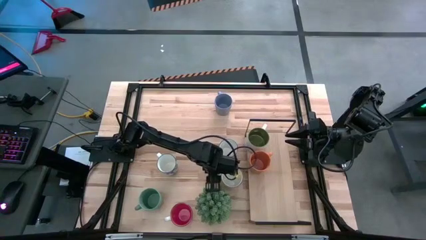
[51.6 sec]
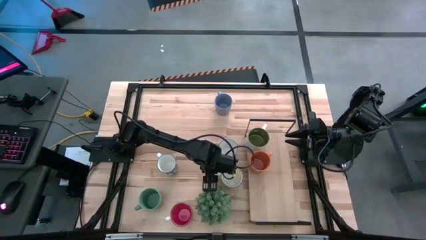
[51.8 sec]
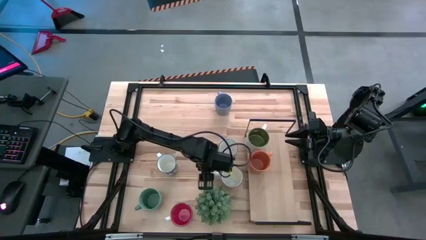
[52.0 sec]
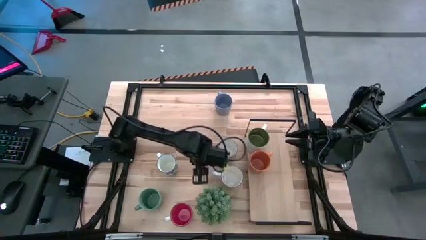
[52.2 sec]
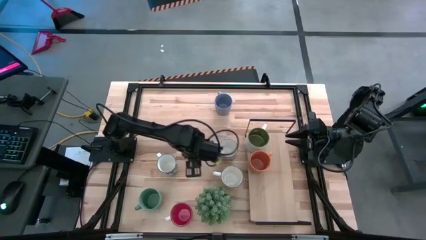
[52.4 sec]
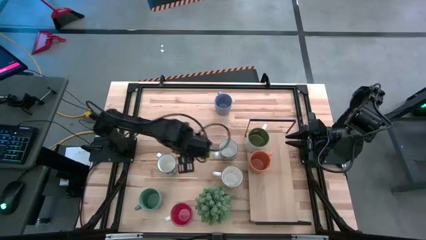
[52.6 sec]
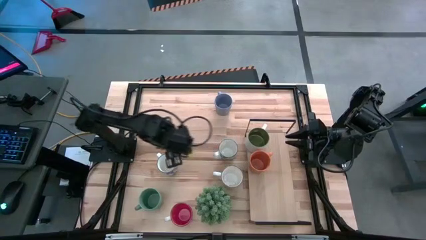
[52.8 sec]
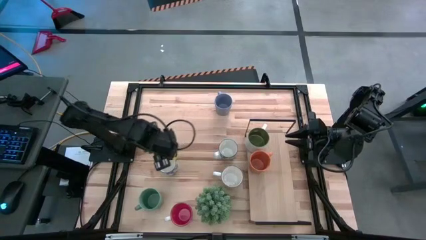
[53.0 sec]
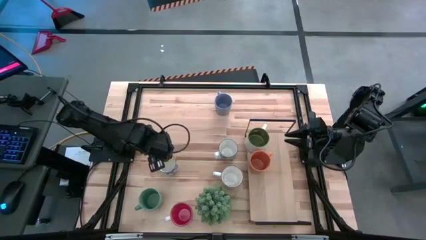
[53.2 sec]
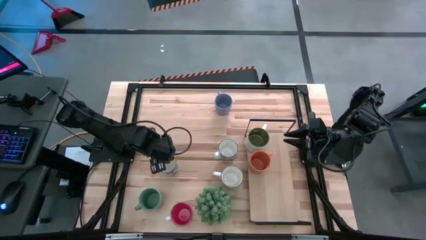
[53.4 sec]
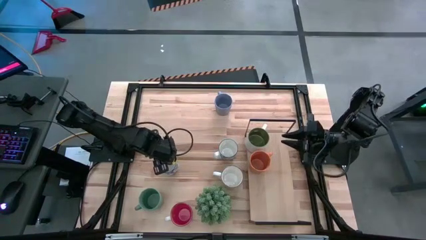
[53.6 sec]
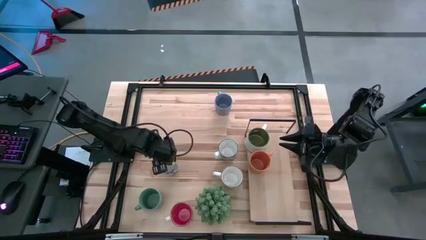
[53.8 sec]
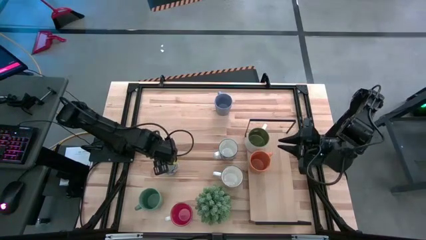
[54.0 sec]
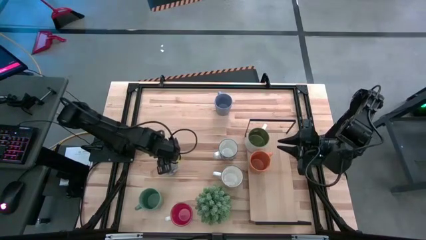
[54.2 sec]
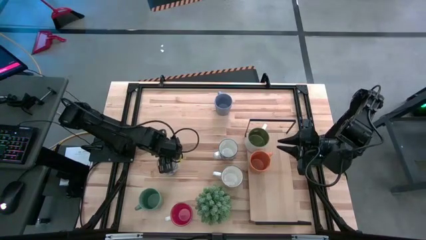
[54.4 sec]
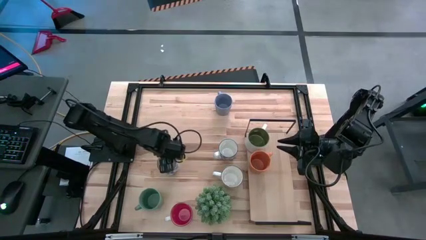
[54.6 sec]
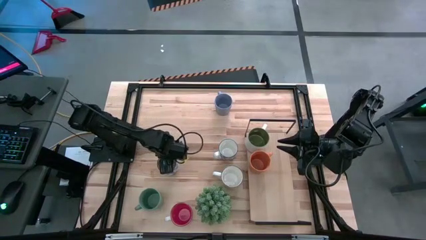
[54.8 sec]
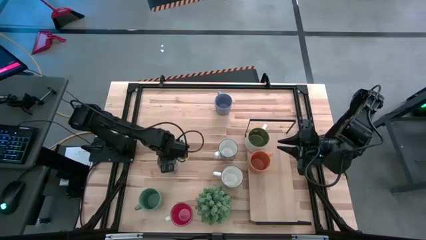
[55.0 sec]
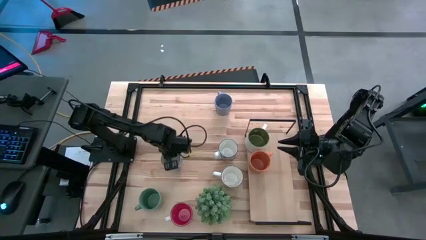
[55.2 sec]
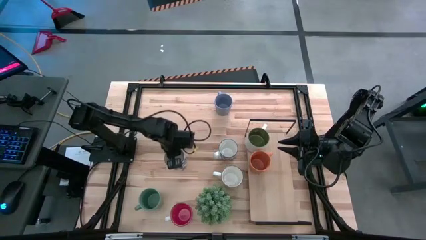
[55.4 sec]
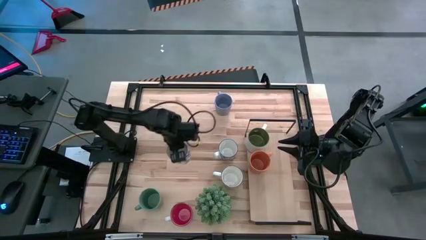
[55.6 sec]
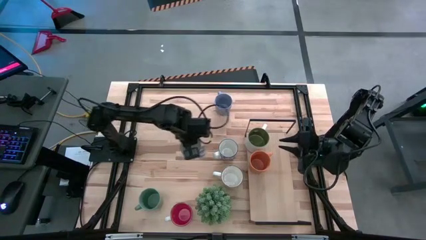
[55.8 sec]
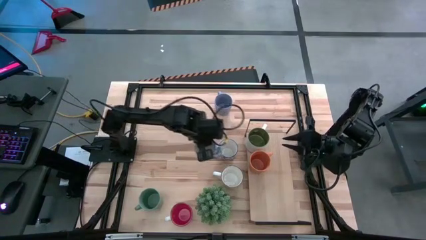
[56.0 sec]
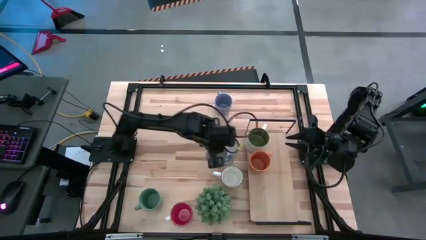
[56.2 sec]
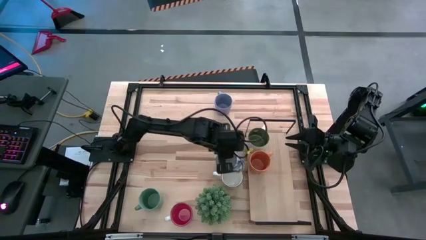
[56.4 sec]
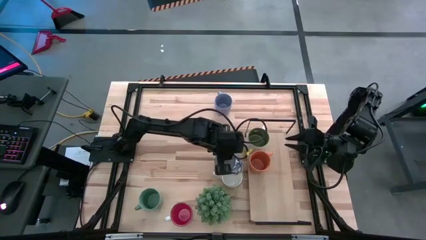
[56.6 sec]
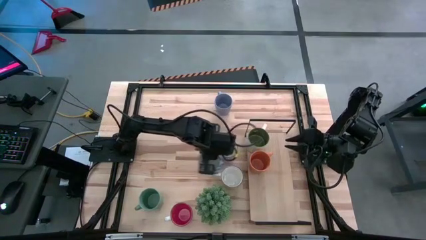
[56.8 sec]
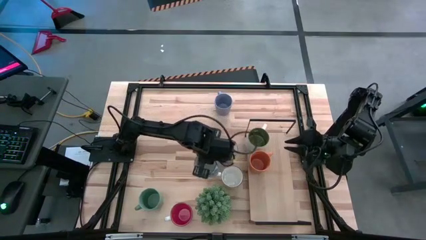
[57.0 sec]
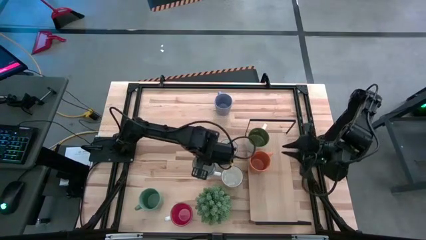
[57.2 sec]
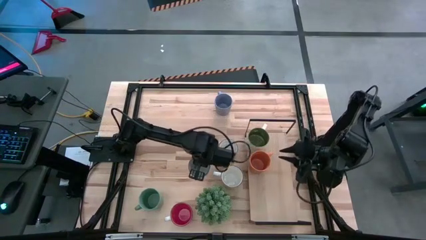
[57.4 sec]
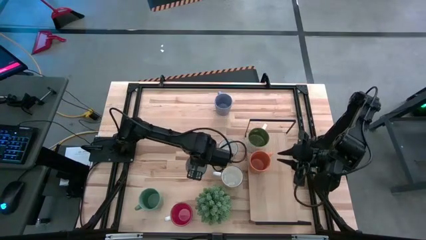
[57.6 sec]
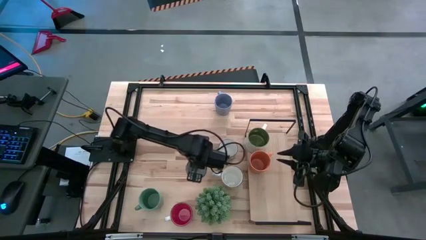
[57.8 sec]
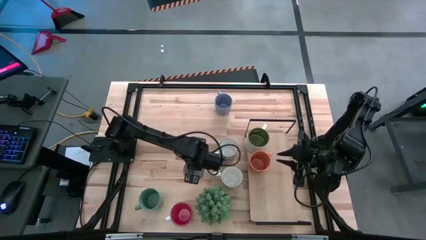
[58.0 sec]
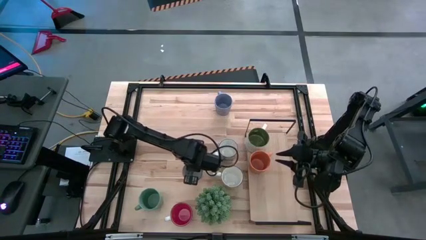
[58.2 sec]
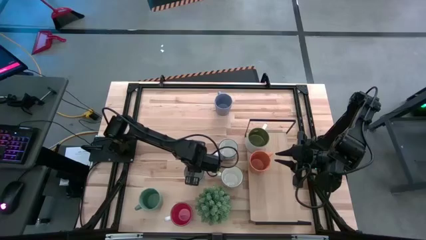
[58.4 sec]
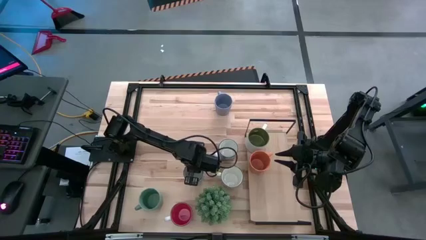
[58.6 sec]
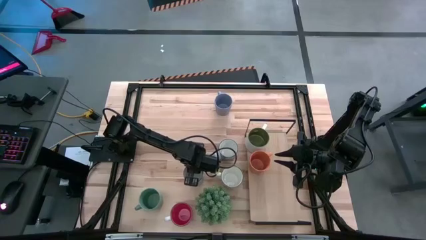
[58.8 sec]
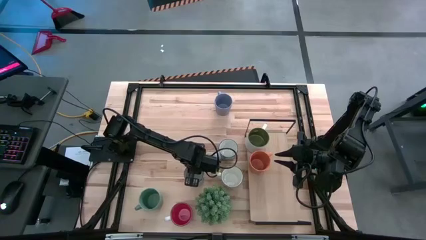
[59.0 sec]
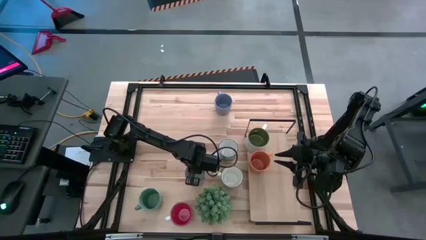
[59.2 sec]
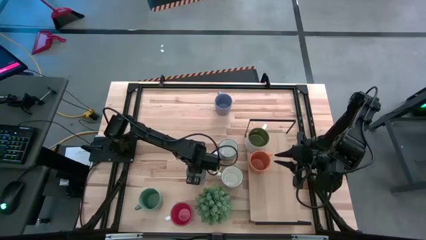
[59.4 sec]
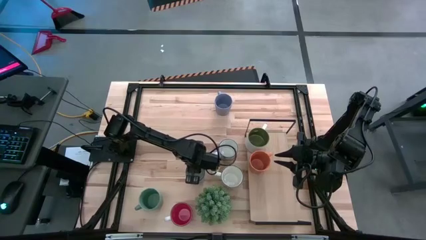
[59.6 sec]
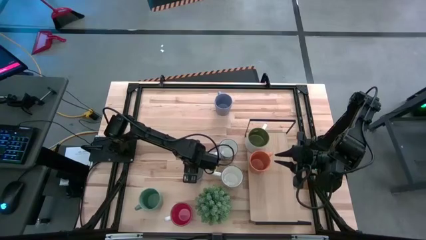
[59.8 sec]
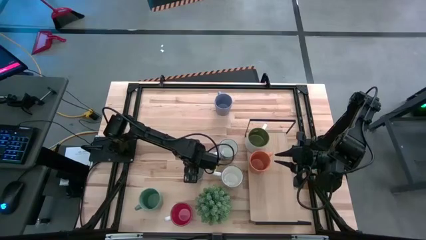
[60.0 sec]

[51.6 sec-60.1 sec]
Task: Place coffee mugs
Move the left blue mug to the center of the table

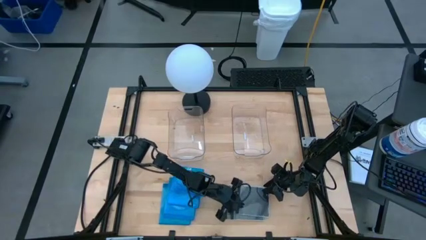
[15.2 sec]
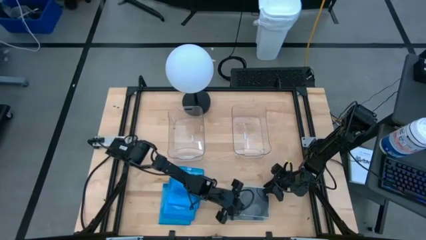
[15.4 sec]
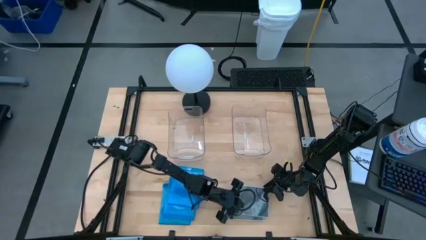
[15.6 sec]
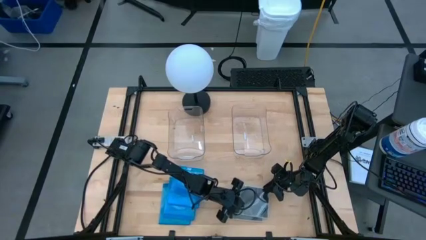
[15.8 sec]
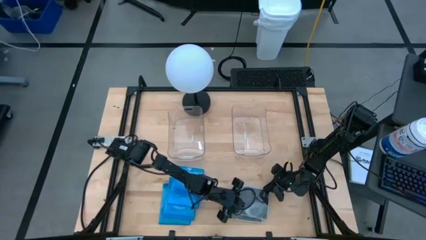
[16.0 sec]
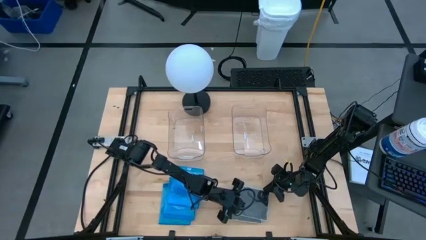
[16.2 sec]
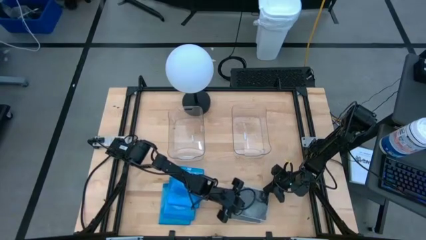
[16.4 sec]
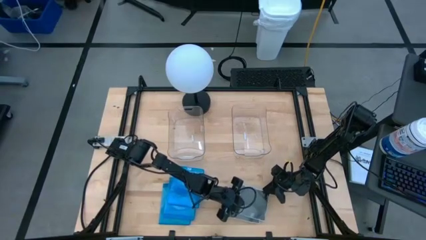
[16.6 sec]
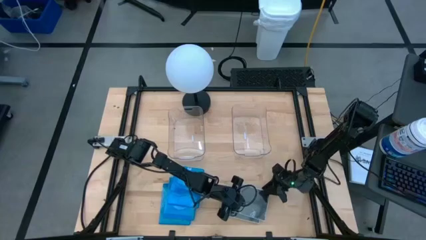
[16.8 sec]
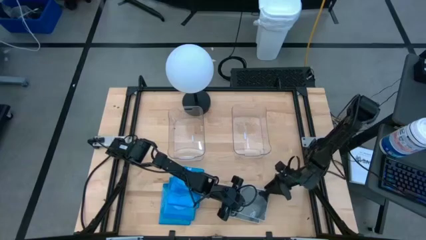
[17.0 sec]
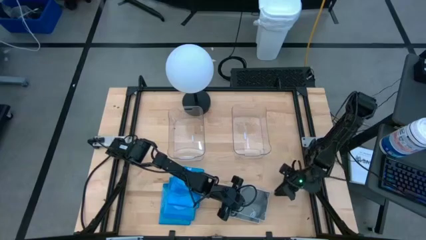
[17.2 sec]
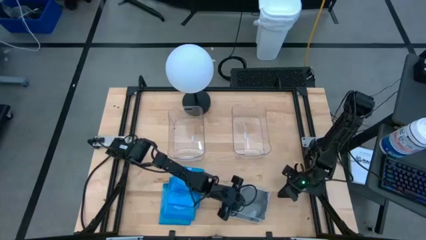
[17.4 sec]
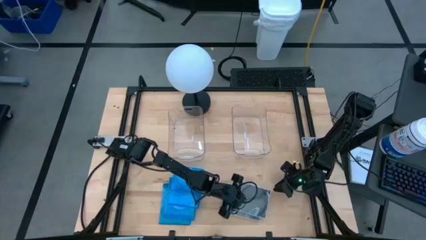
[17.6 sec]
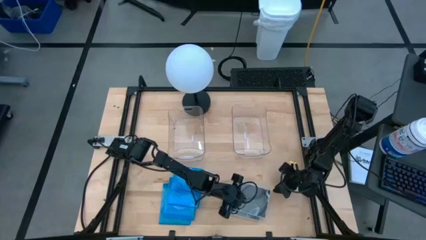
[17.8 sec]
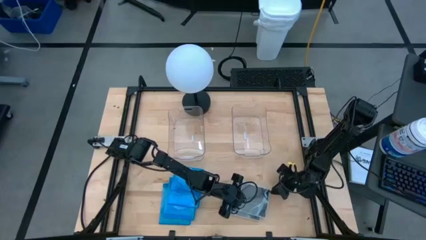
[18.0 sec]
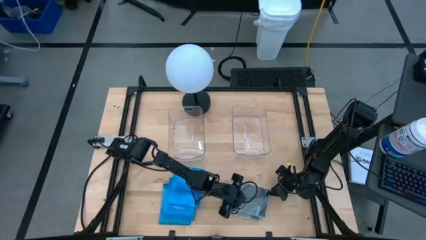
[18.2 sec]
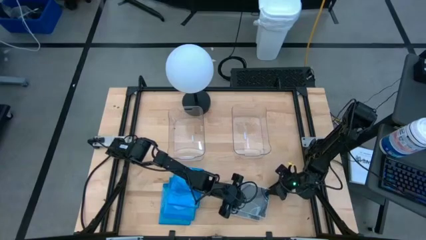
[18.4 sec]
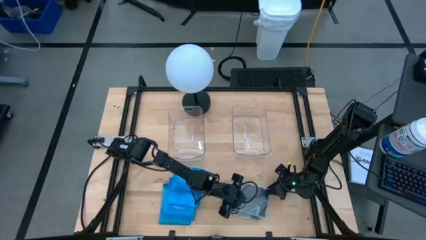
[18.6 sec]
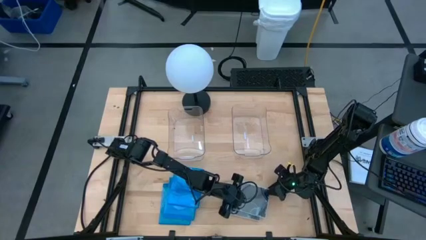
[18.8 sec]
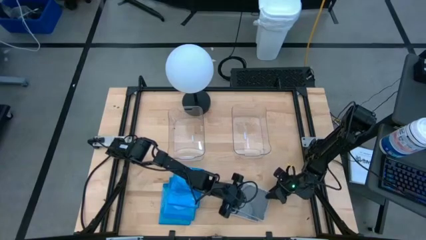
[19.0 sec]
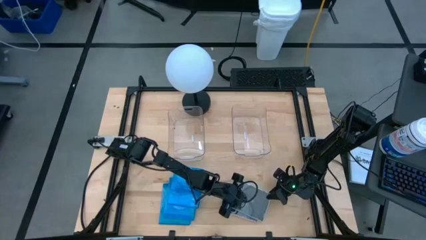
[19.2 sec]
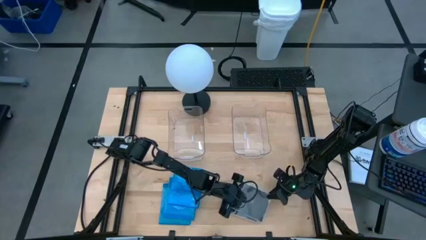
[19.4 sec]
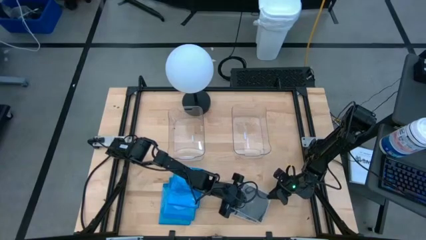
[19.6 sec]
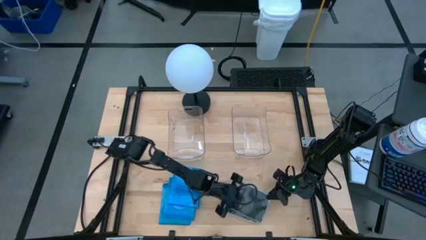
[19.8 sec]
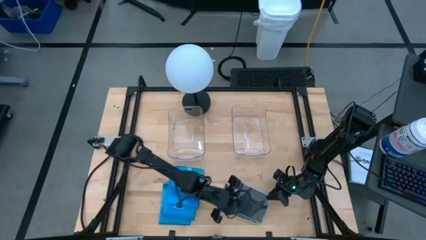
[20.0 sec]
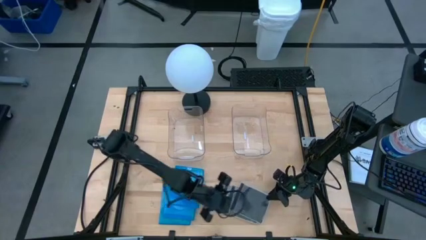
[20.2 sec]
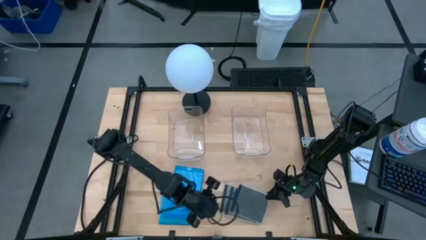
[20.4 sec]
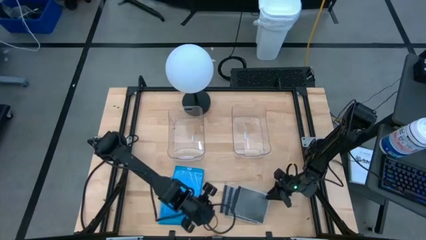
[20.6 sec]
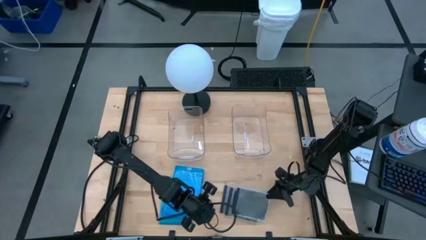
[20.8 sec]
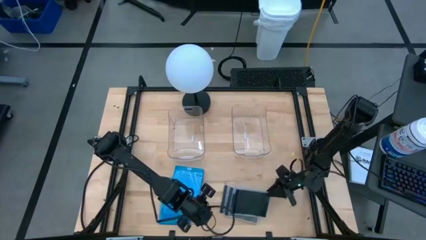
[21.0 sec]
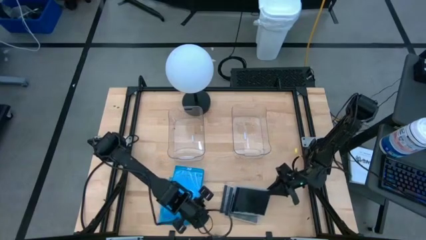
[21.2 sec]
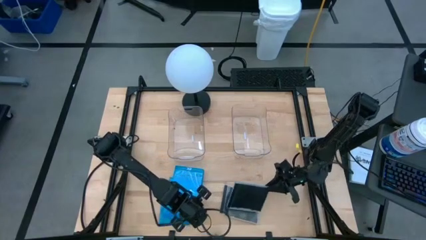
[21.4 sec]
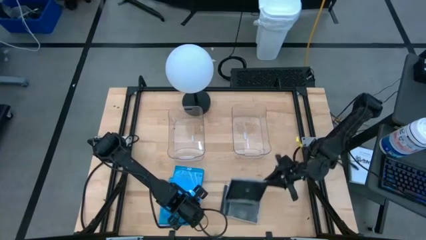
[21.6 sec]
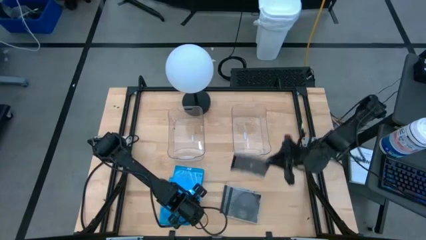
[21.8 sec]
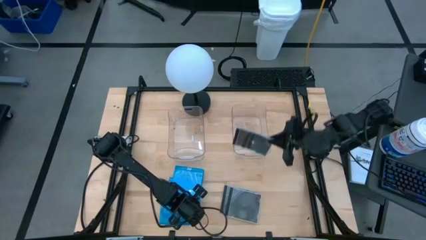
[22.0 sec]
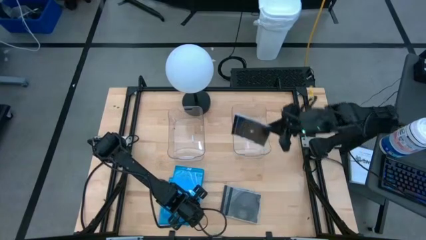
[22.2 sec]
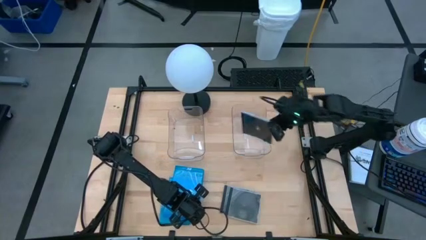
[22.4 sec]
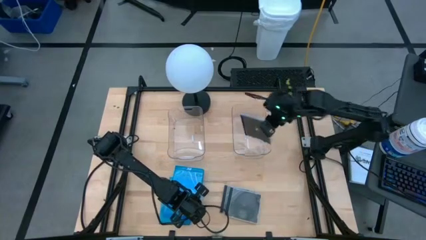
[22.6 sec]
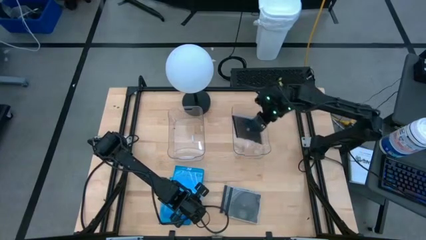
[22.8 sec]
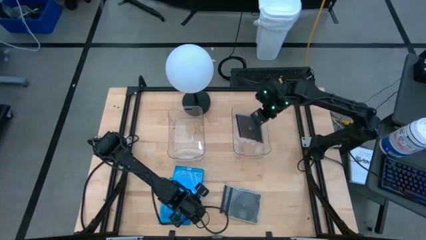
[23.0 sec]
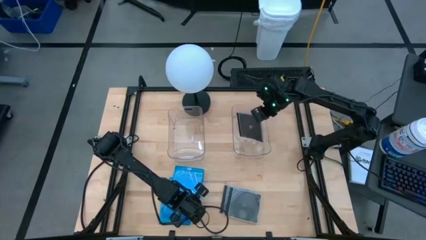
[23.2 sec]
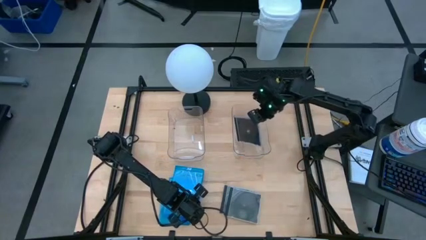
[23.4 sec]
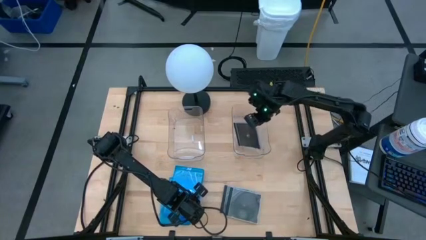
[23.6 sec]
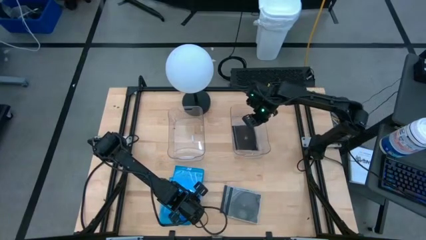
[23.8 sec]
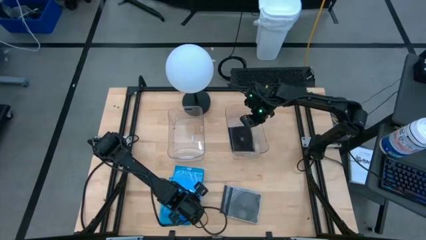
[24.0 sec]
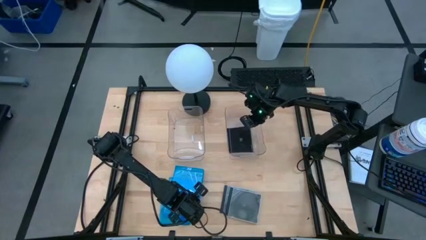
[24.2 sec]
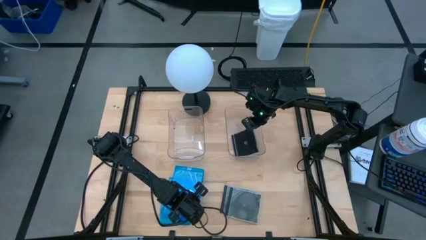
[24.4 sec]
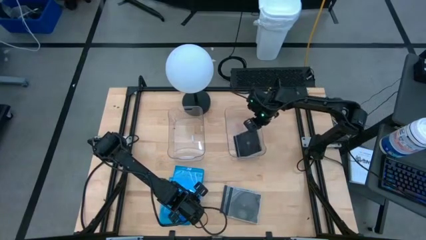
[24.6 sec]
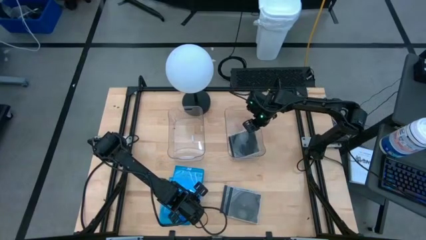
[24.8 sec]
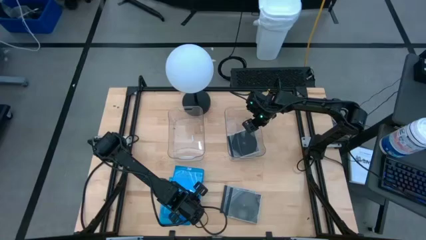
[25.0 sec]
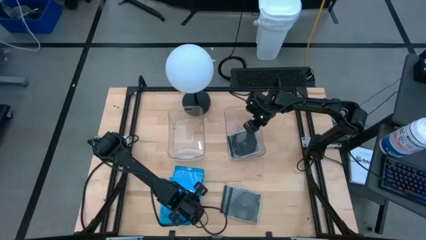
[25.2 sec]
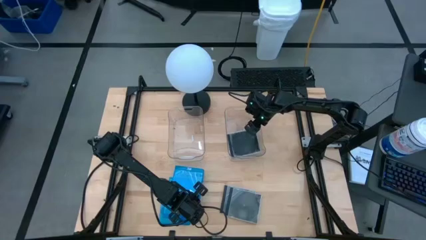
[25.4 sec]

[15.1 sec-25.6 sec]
Task: Pick & place jewel cases by type
Put the black CD case into the right transparent bin
